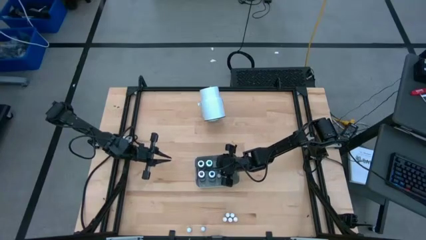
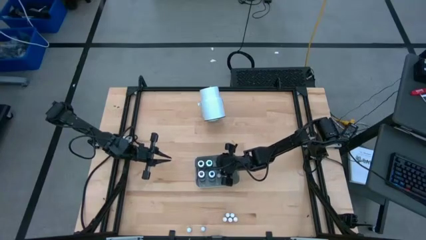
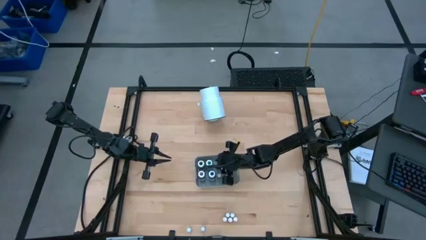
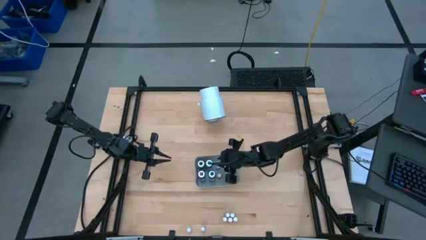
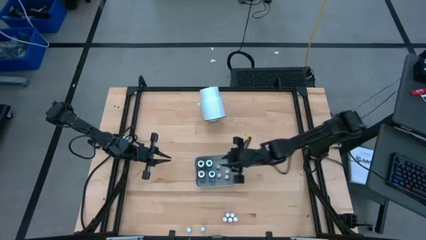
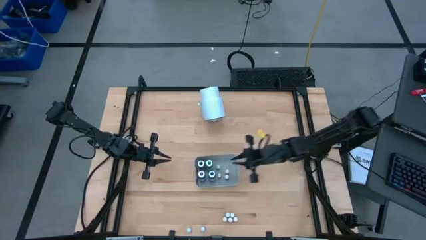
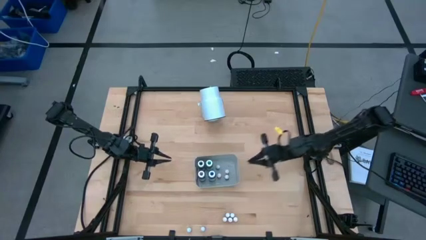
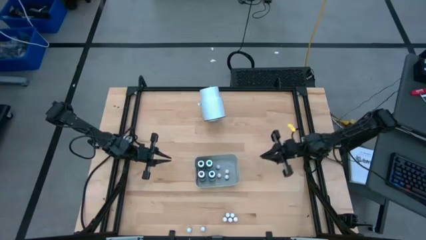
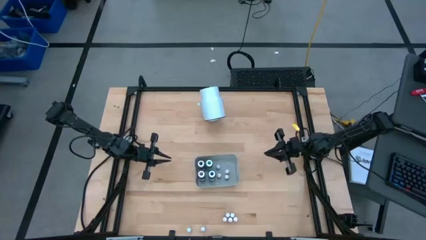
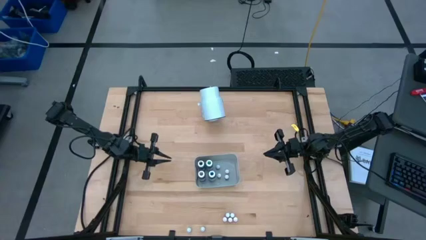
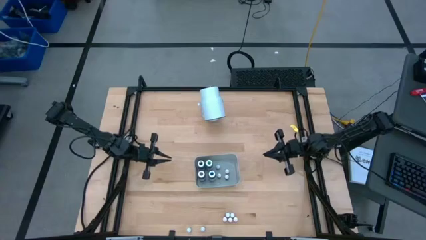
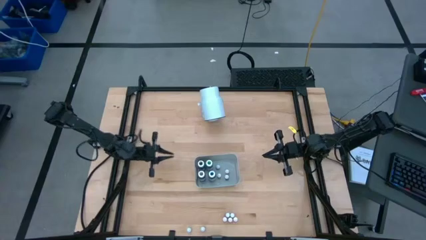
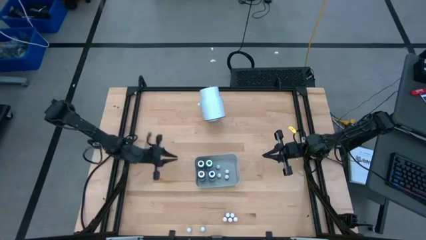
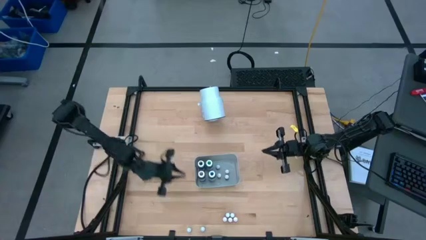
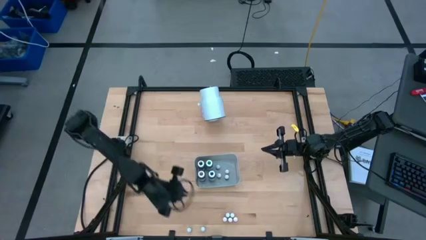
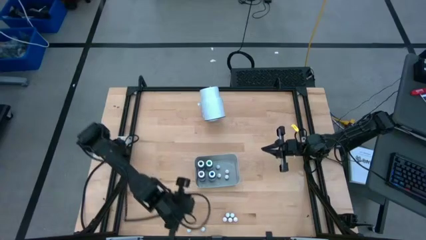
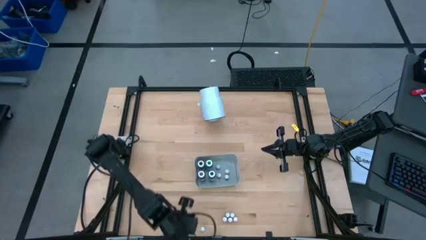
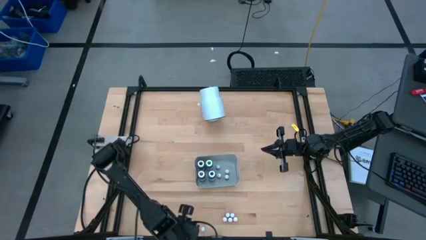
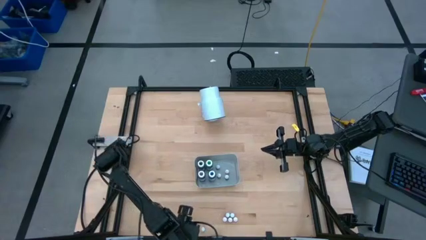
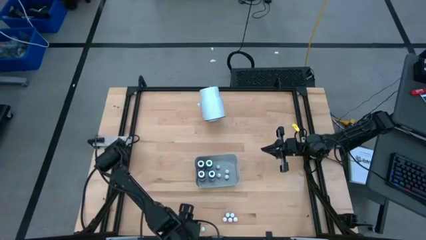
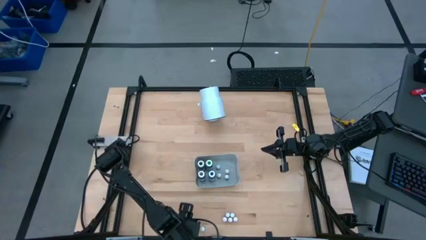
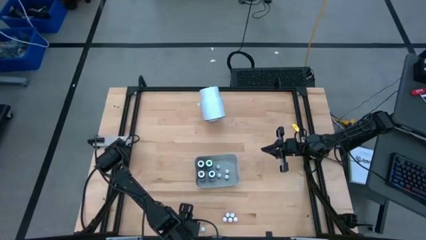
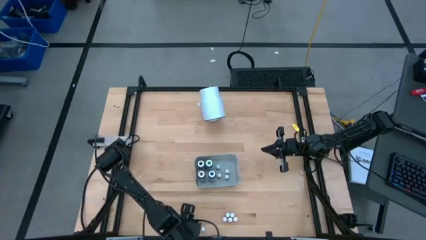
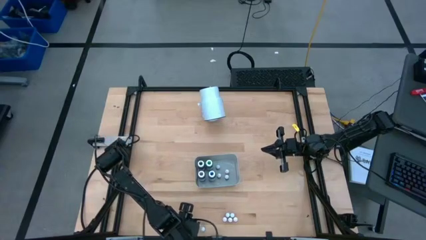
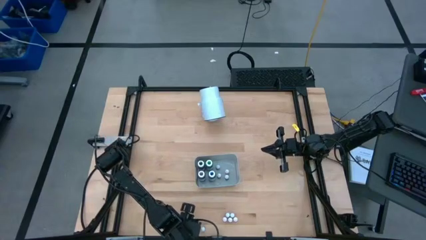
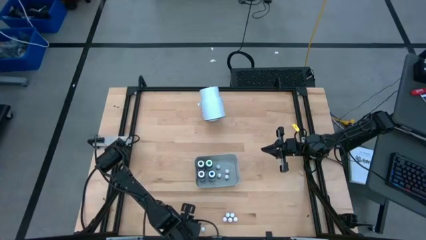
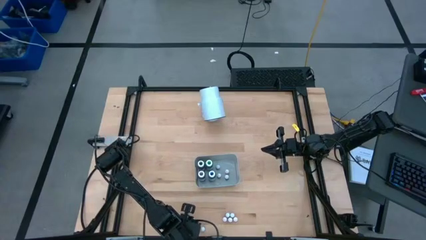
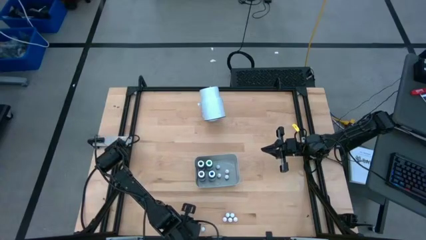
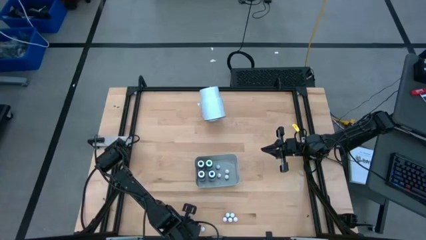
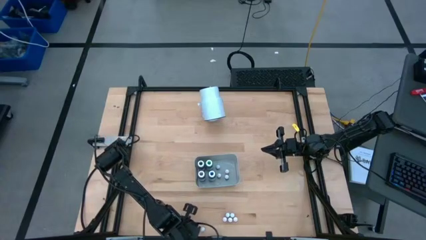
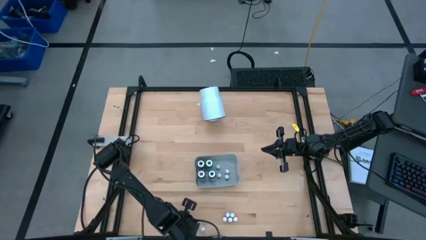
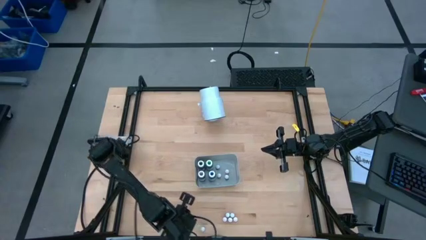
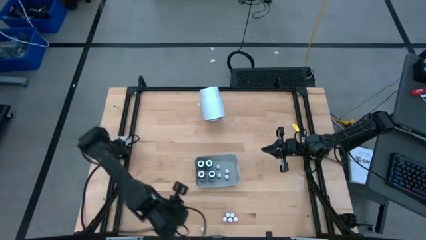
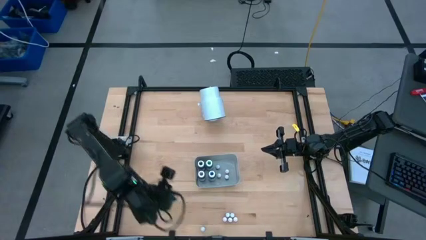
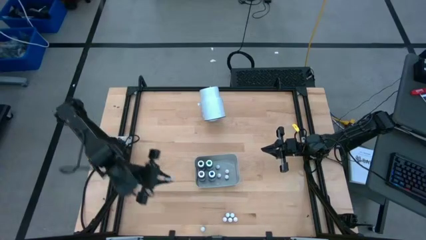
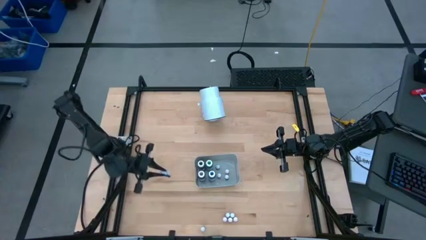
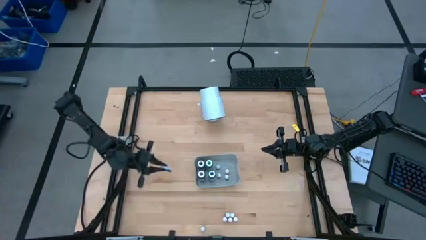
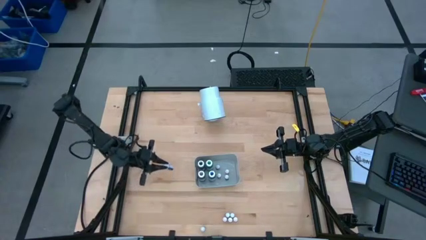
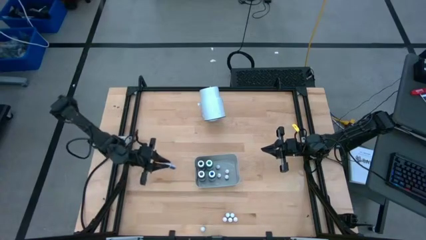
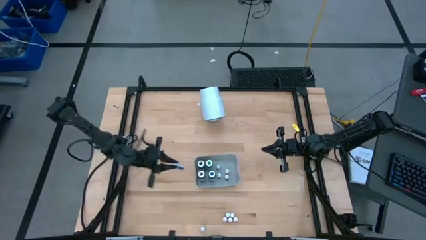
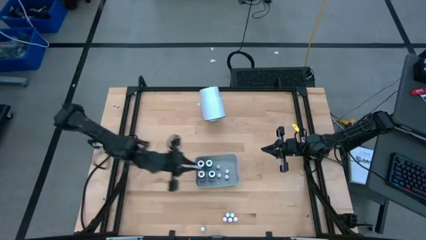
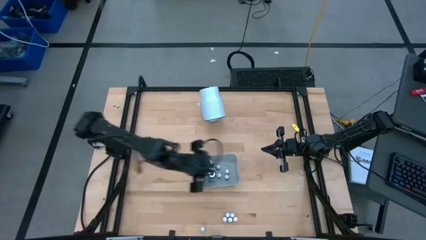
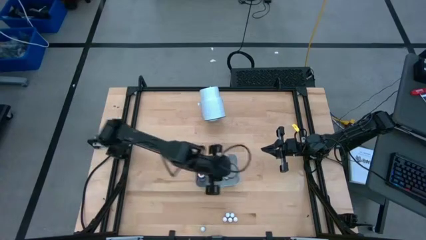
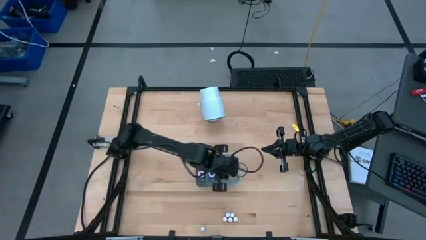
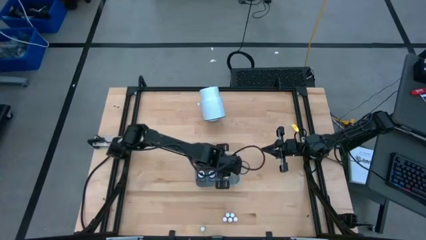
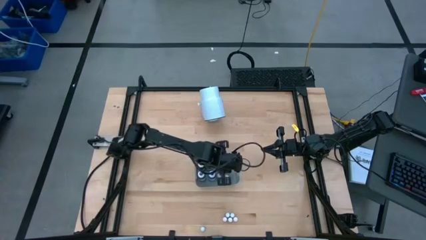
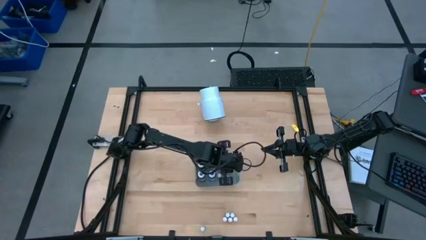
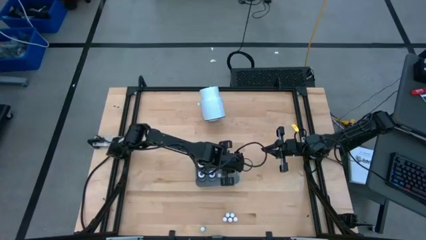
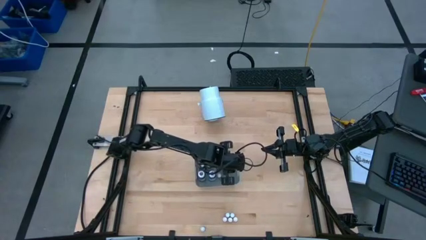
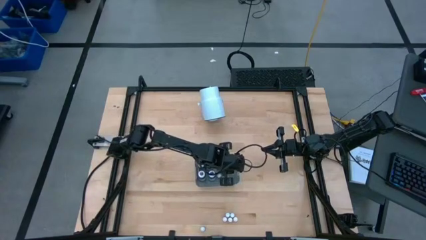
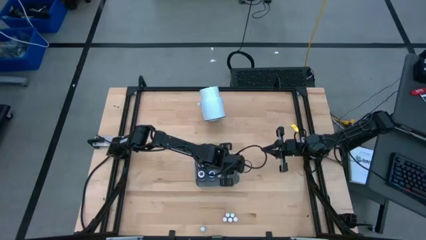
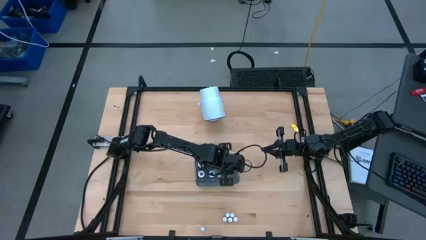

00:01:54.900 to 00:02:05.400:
Task: Pick & Place food coloring
Put the small blue food coloring into the gray bin

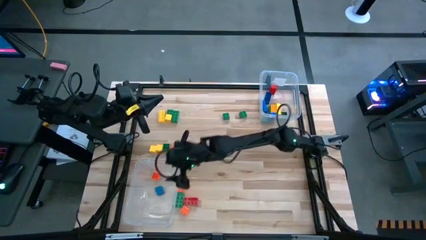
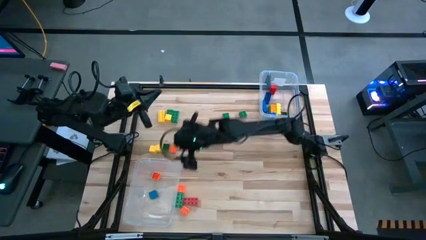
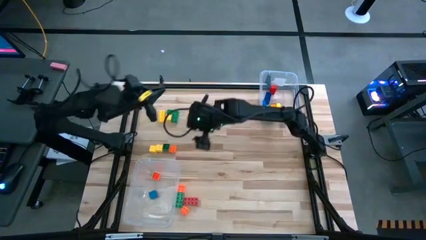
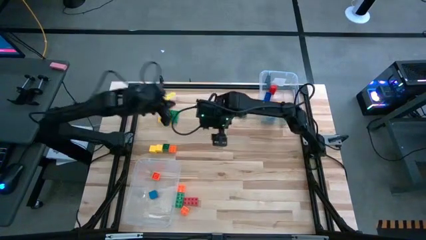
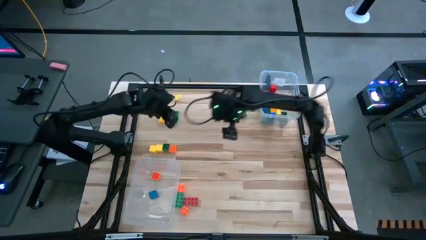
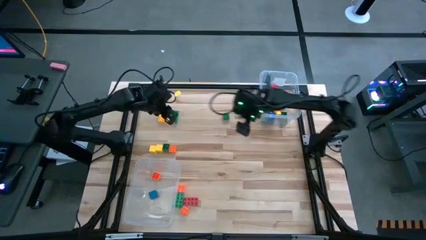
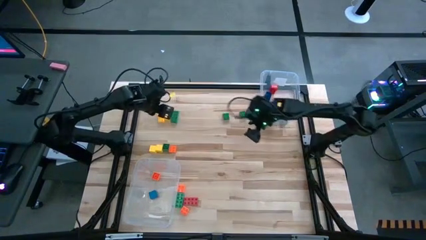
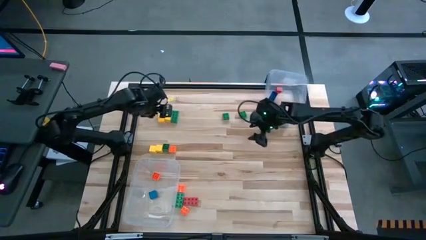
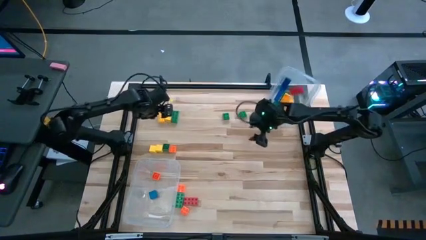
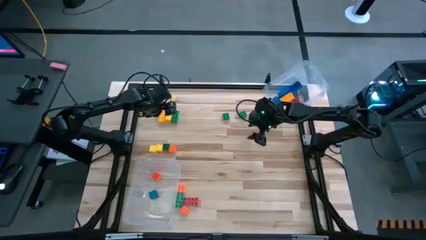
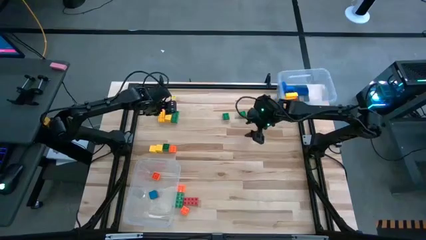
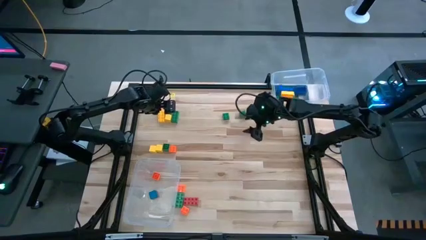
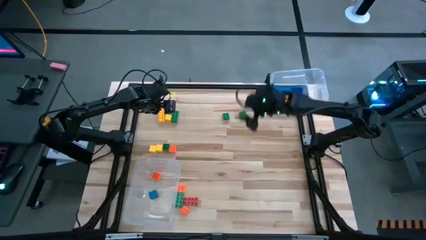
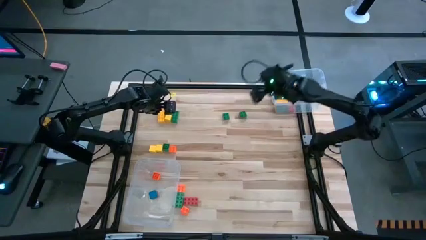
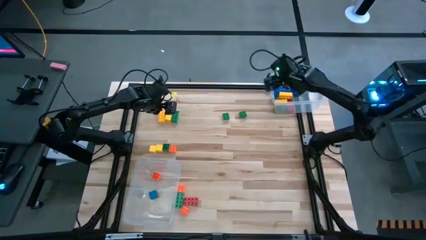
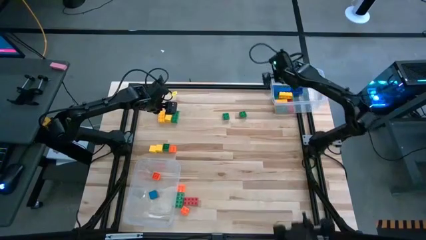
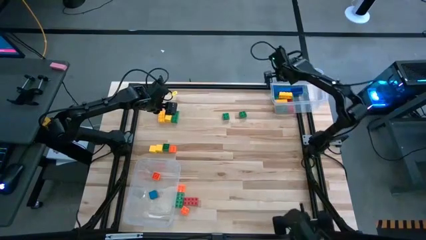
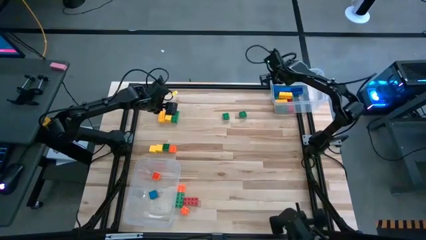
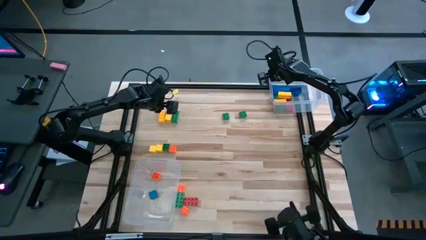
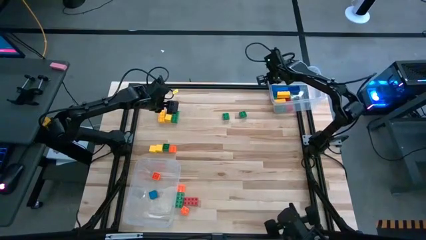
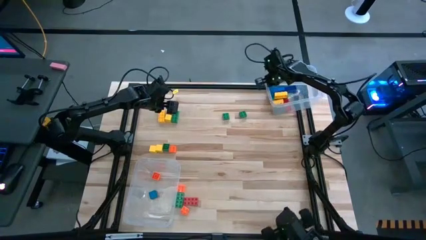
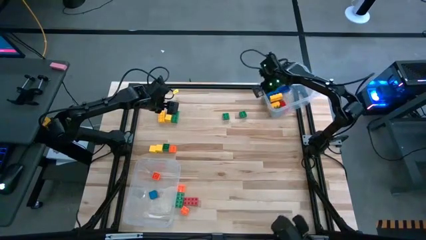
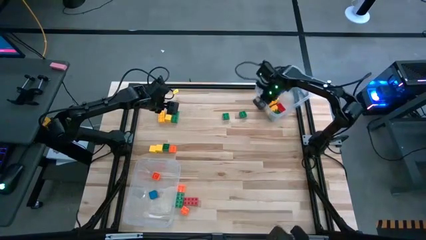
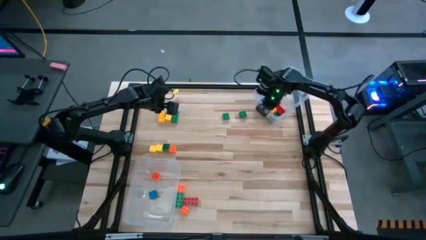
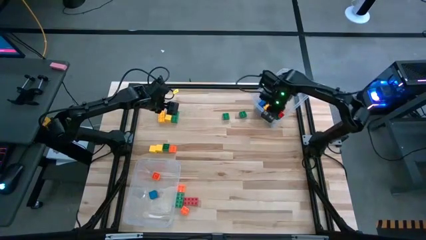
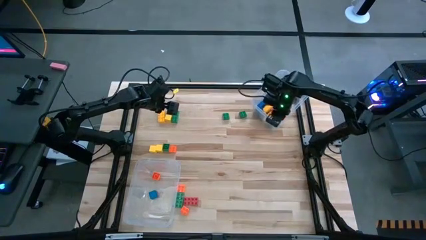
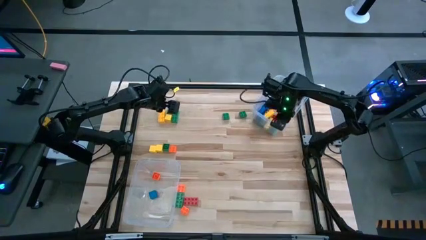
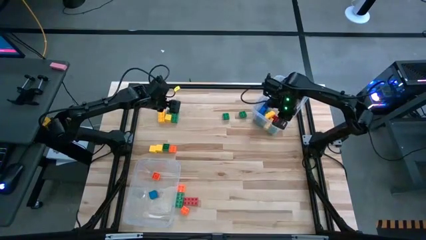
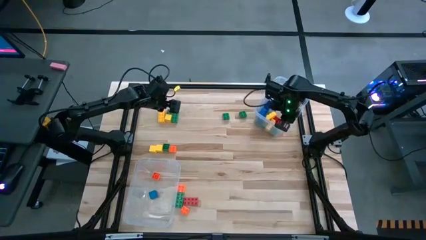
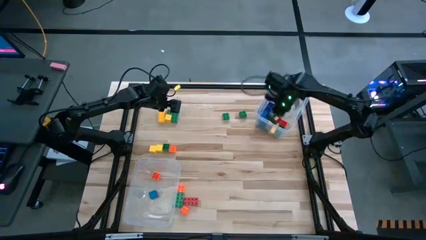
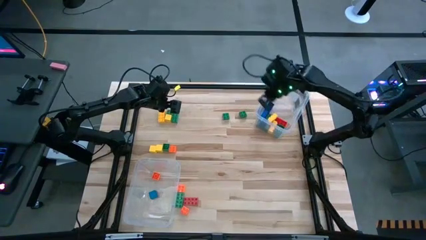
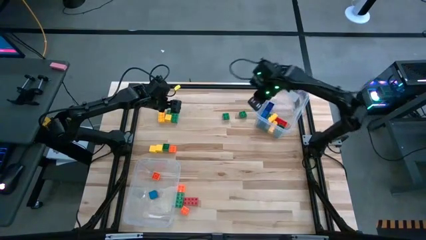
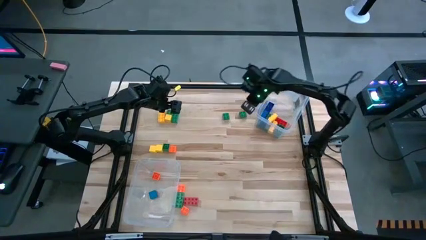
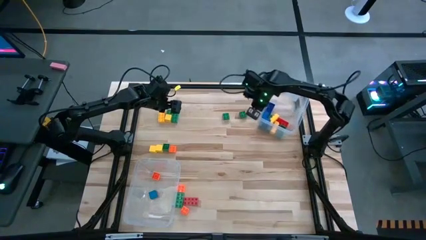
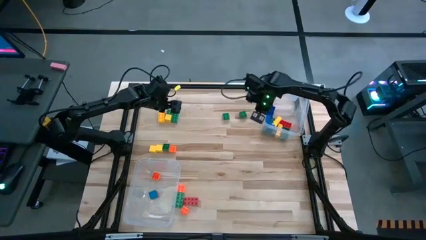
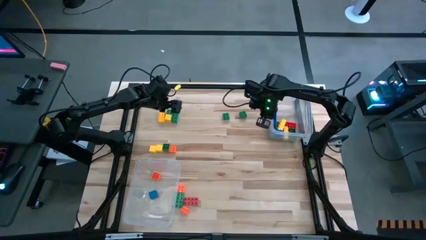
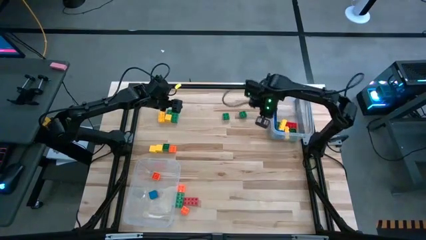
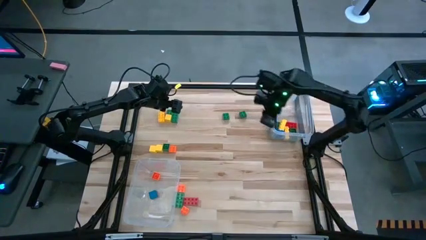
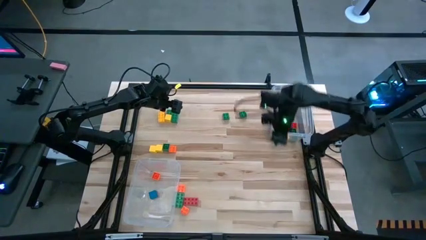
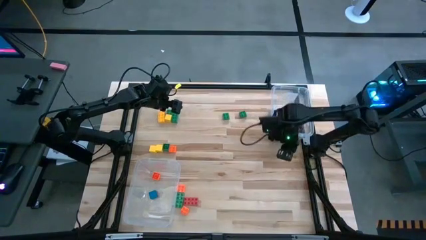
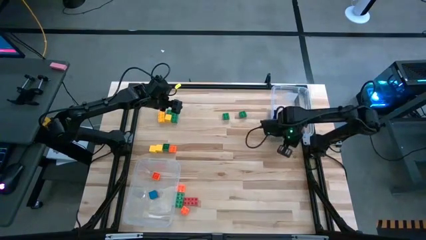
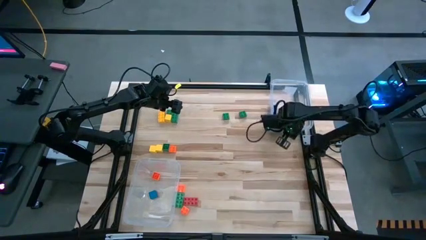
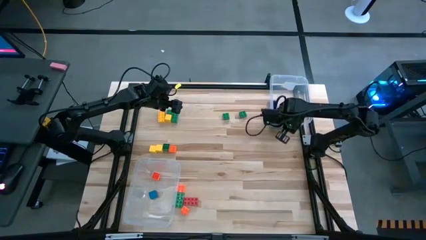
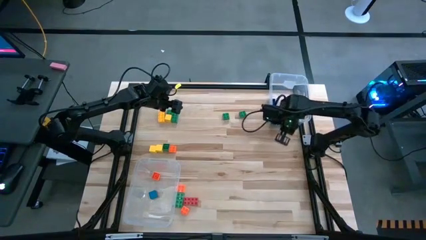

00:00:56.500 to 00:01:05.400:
Task: Sort blocks by size
Adjust the right transparent bin
